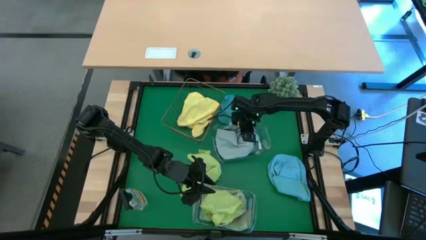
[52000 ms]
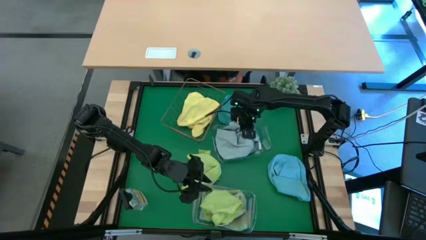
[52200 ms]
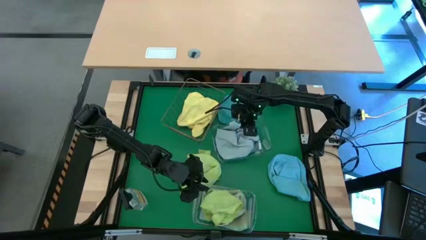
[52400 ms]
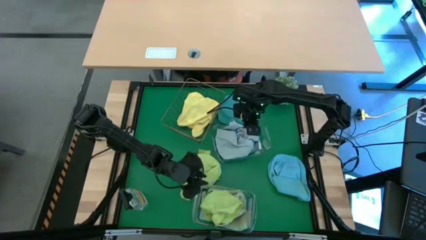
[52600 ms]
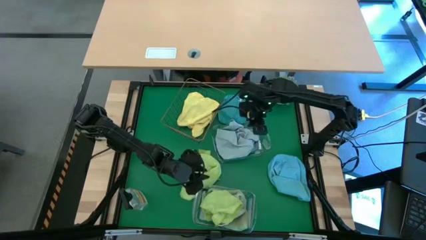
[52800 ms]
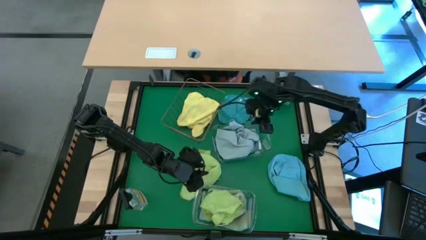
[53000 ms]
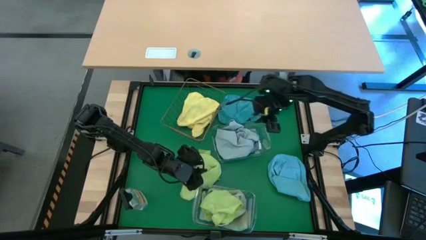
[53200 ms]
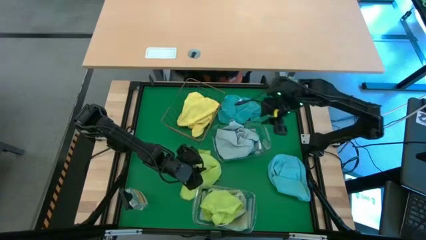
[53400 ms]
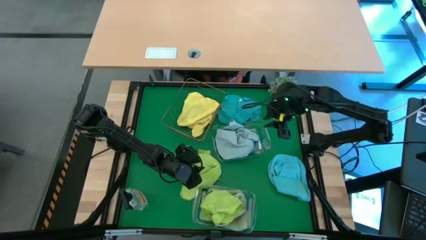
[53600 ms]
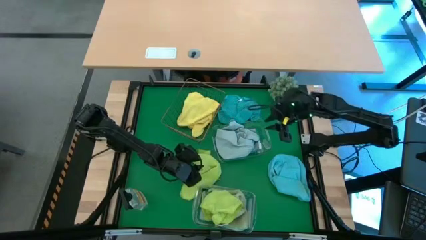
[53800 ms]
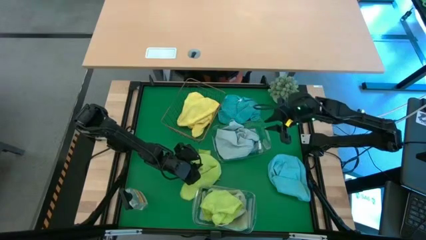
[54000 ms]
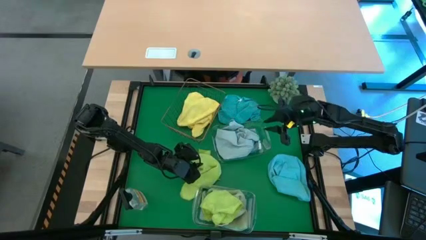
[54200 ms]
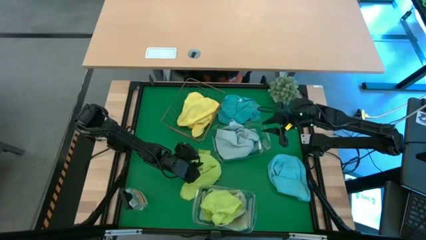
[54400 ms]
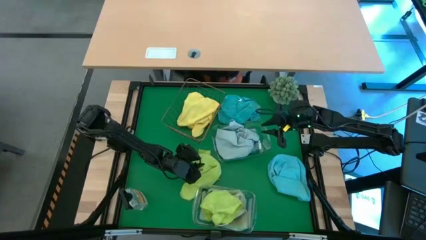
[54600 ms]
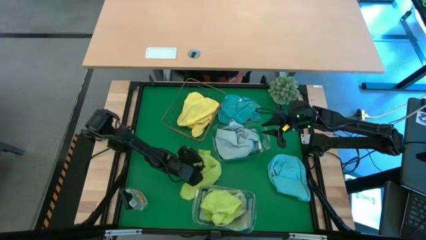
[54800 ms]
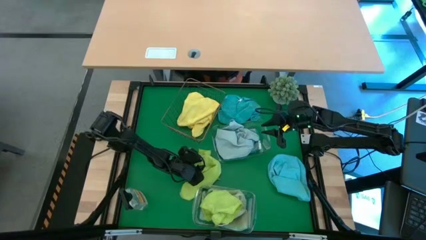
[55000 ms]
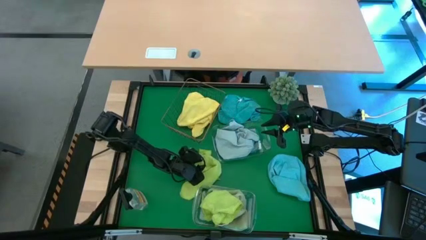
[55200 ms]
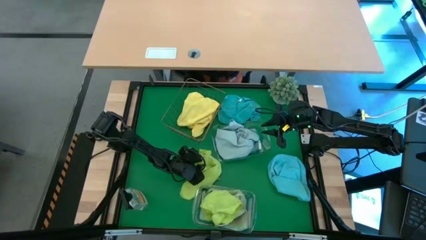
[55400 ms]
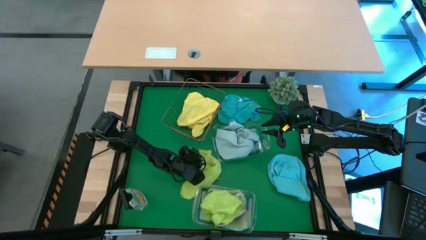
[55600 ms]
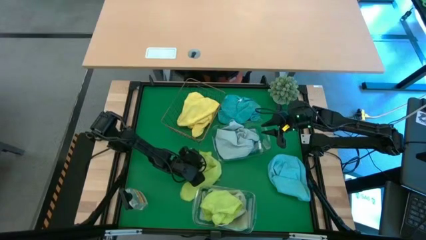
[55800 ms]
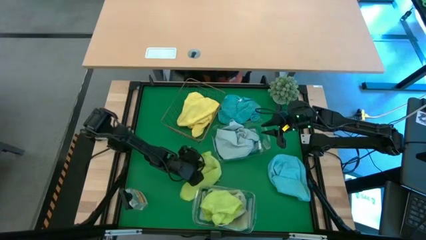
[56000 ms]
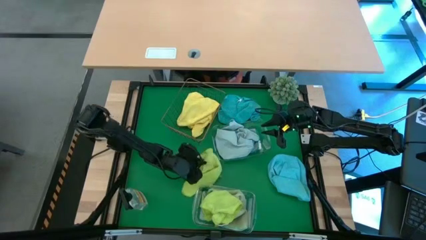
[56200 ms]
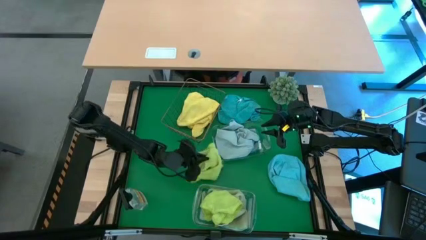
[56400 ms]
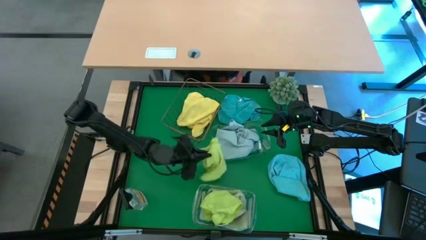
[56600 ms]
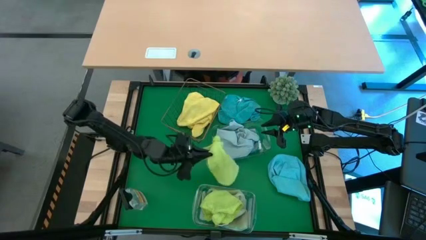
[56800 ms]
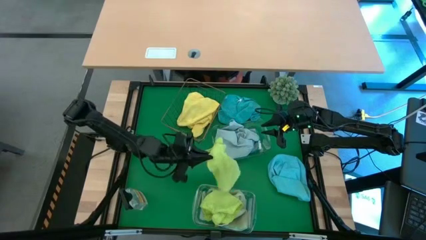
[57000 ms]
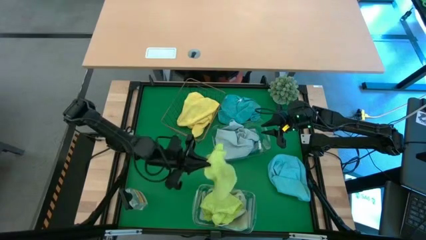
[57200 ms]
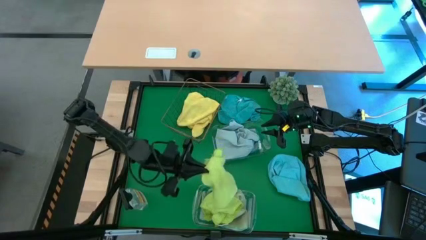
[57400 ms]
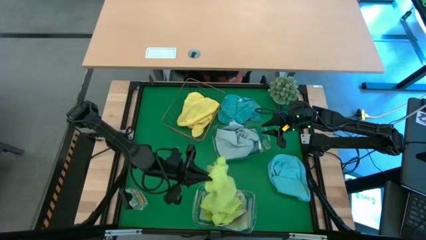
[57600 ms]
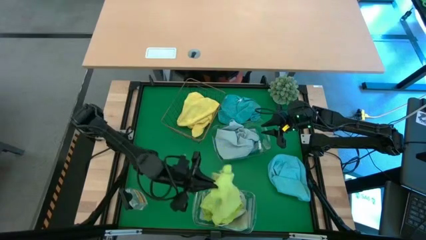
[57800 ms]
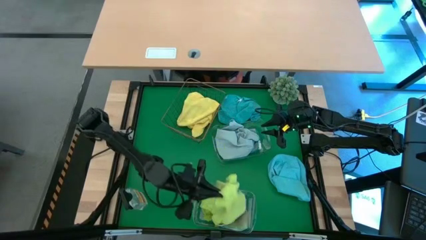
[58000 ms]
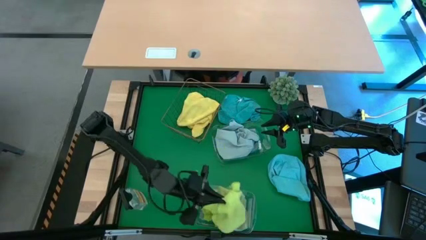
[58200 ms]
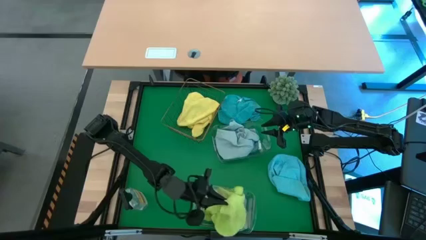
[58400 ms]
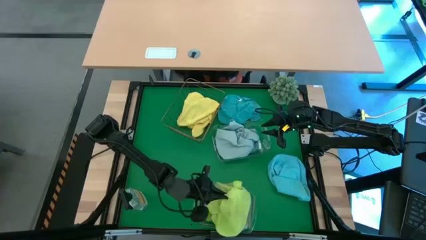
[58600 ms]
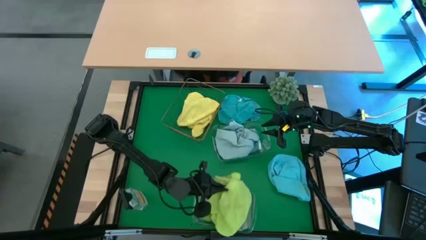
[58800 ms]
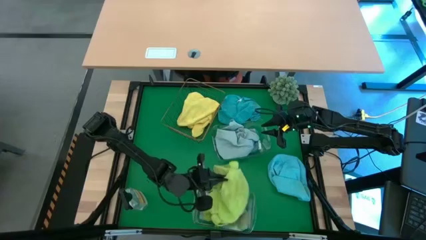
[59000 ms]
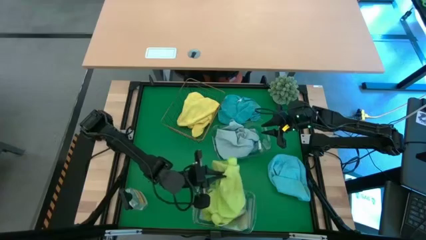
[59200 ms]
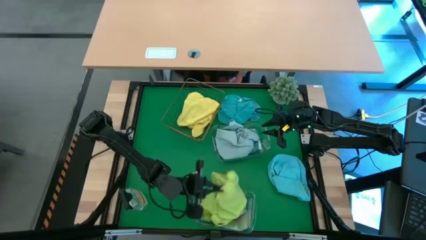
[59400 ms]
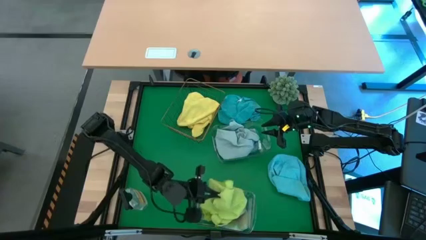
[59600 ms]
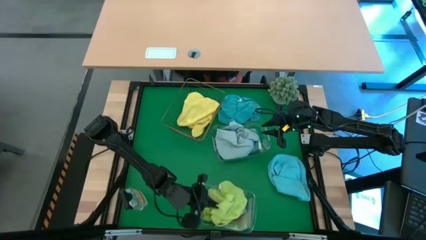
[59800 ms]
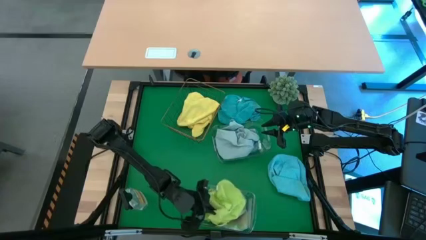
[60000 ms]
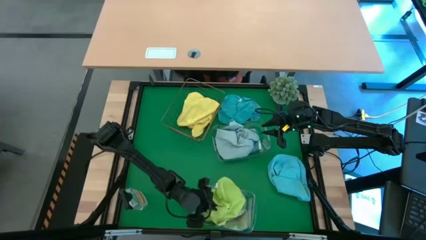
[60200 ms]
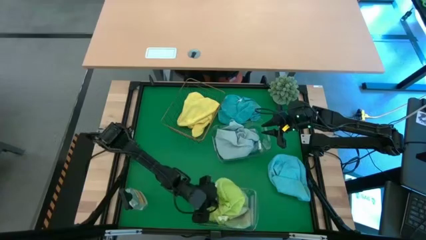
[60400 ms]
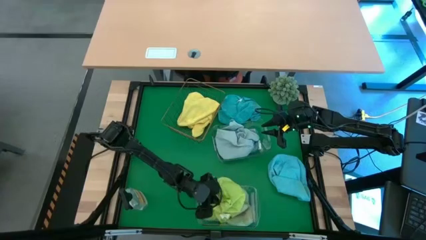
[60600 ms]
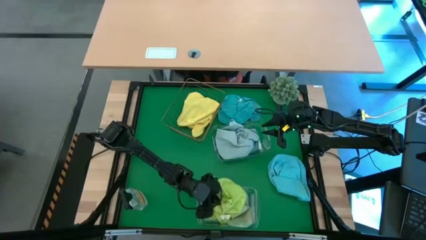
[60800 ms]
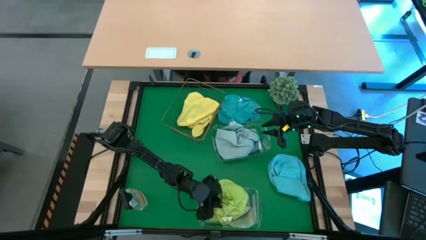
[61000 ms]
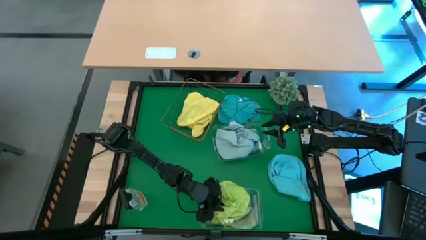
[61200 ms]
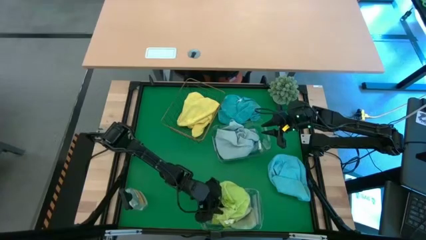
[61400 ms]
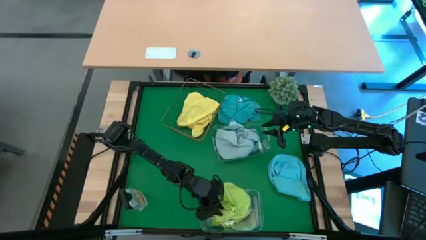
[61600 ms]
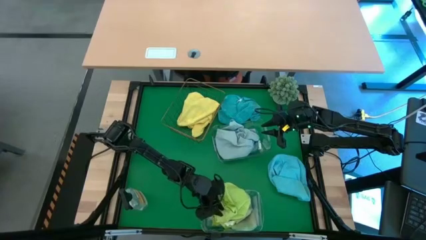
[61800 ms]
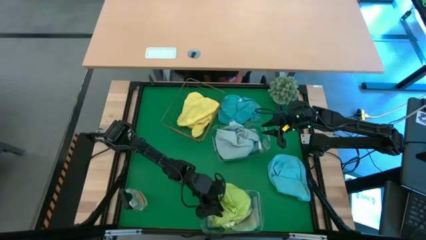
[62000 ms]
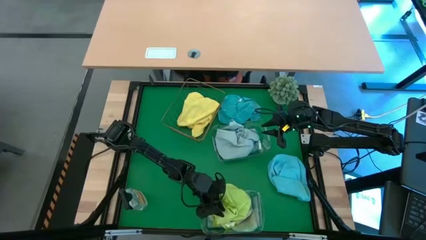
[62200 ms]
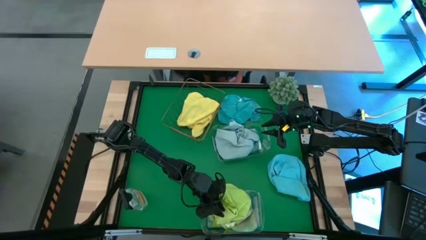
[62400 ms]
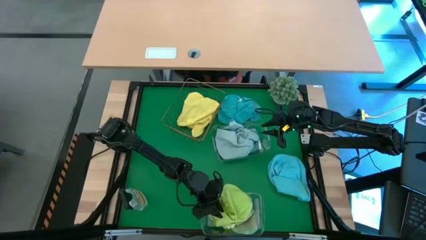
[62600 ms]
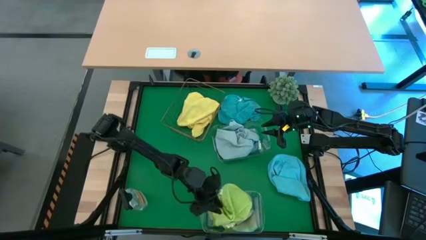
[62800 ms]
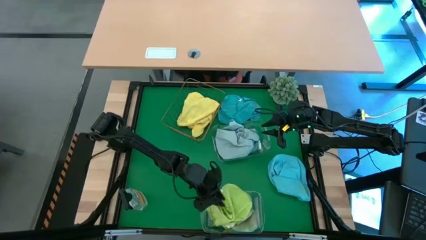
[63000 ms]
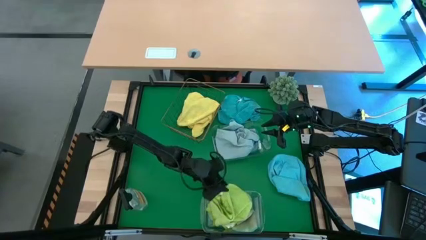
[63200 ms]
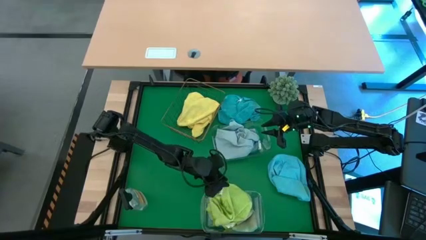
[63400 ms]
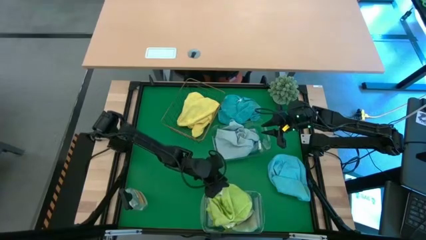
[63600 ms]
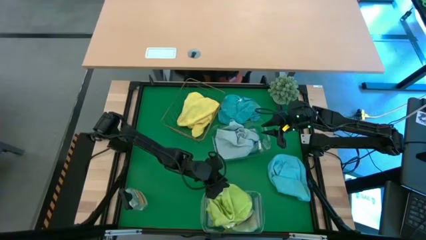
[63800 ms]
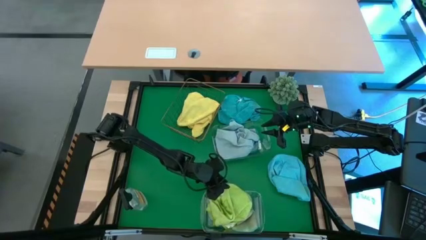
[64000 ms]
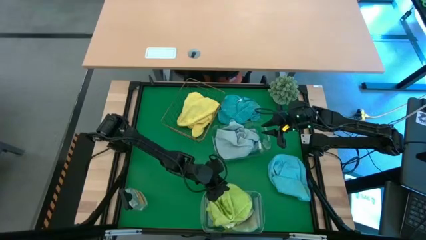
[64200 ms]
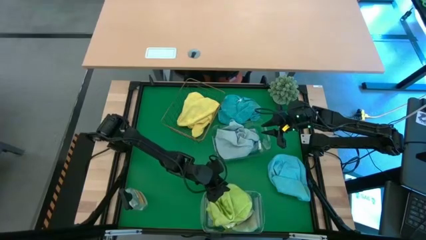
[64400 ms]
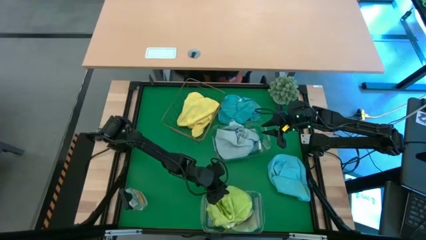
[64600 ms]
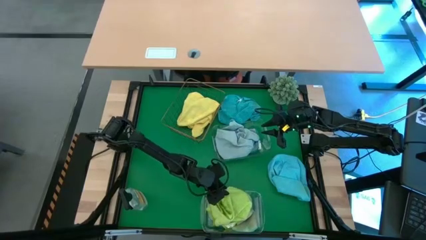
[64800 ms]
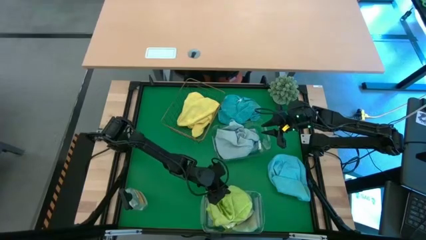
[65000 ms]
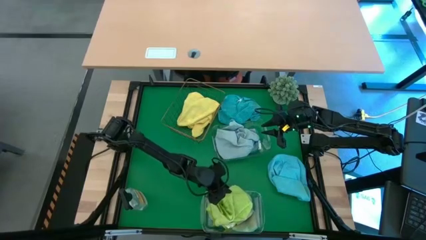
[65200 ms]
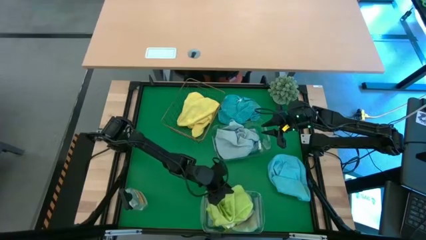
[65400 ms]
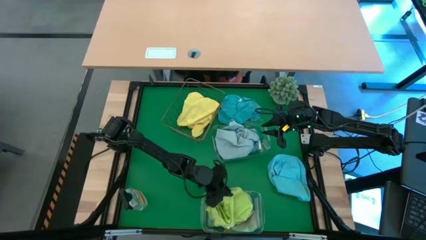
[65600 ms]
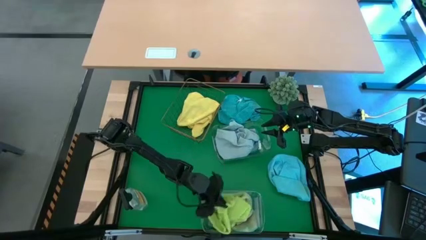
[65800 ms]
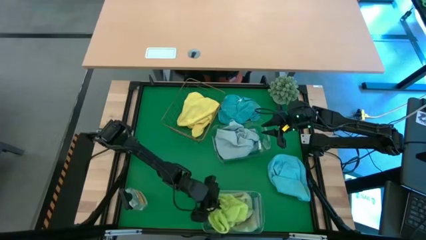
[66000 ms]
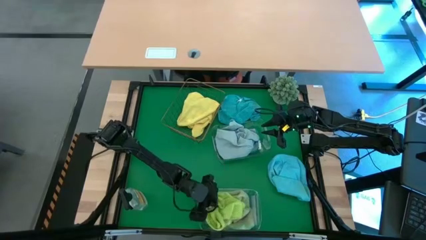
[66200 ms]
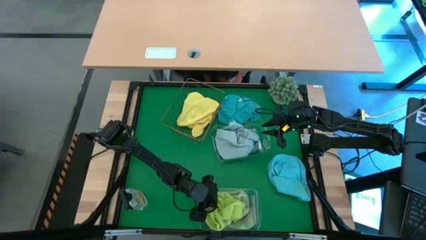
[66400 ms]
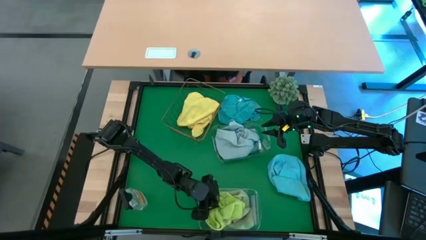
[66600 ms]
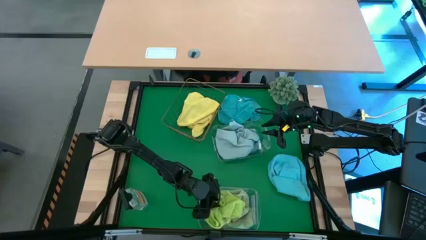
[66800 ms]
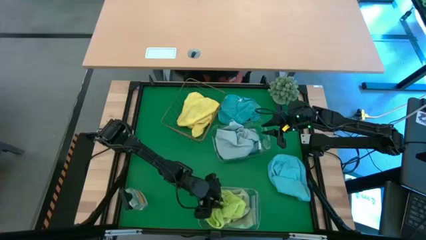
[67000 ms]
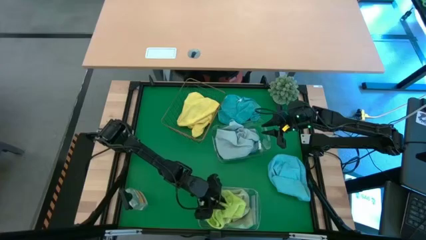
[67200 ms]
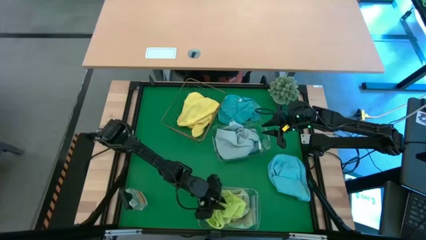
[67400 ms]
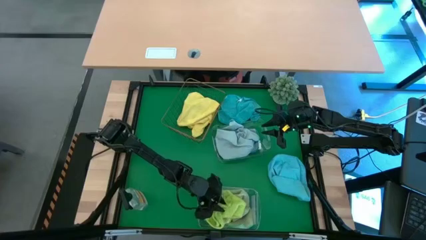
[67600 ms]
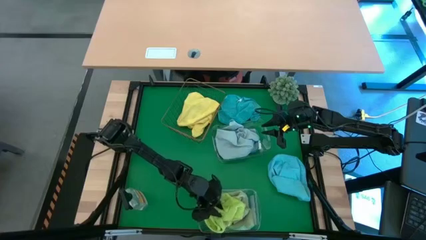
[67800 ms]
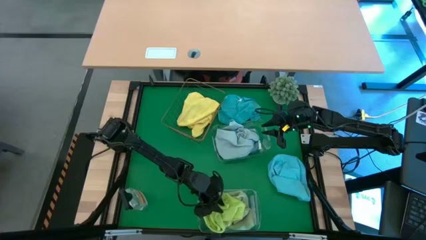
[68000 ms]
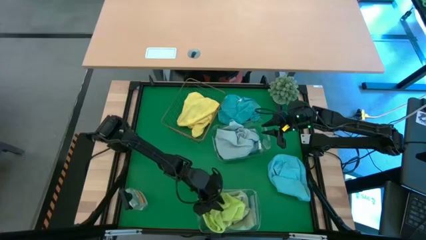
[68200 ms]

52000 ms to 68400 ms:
Task: Sort microfiber towel by color & place in baskets
Put the light green towel into the bottom transparent bin
